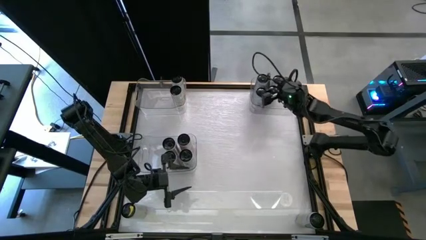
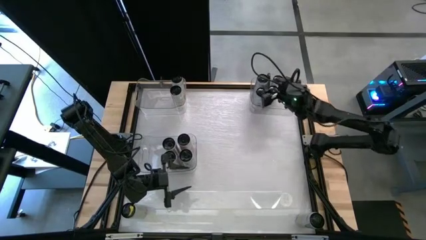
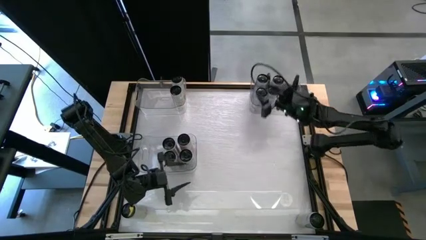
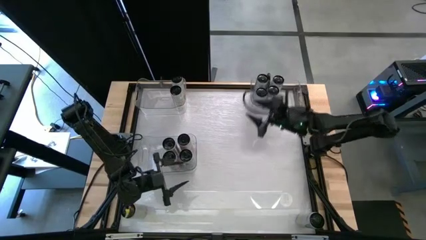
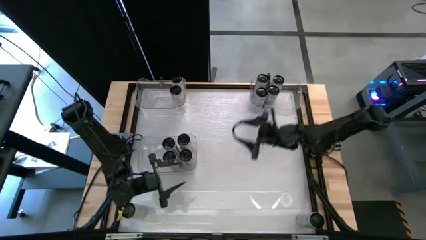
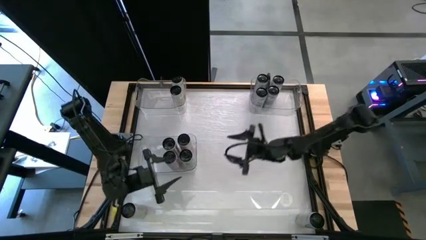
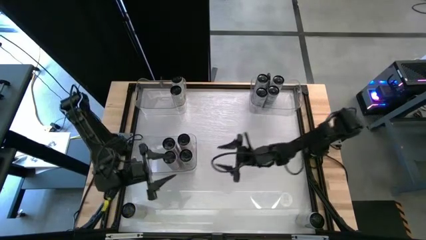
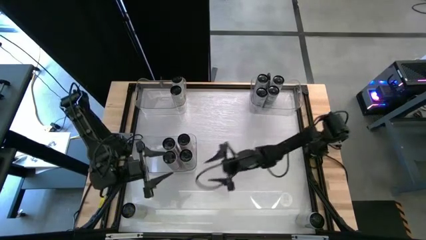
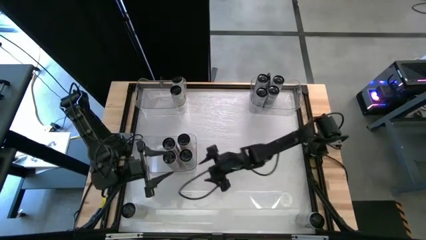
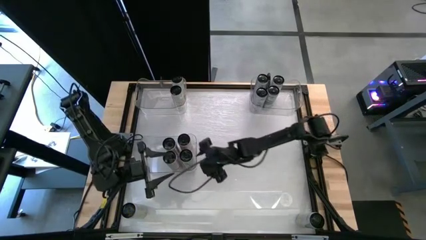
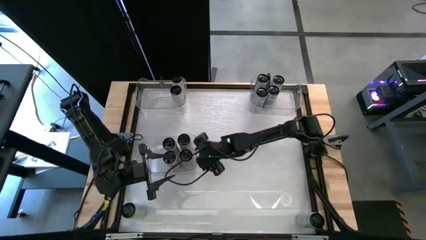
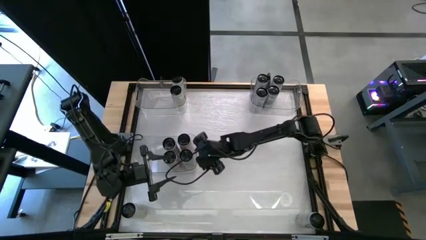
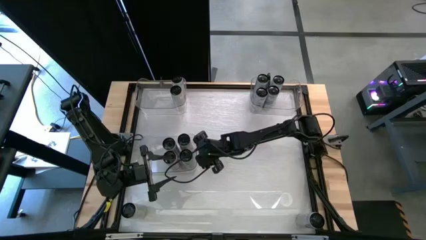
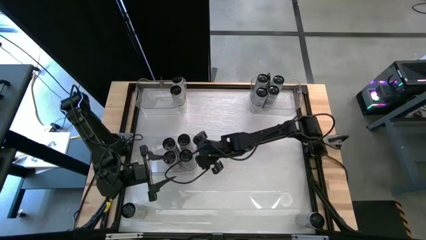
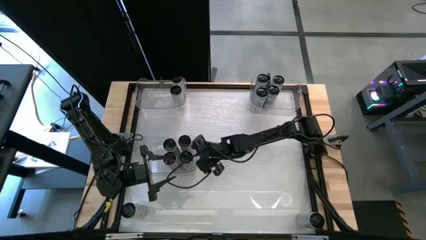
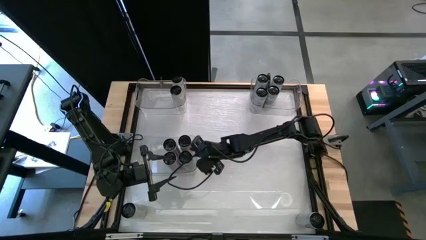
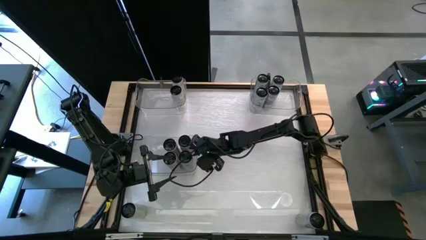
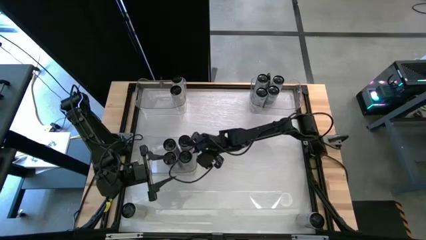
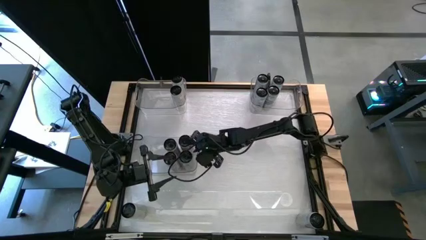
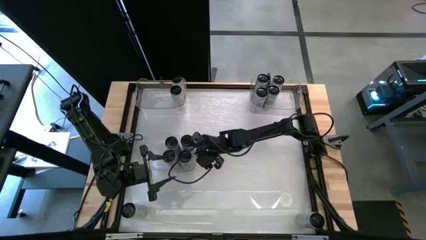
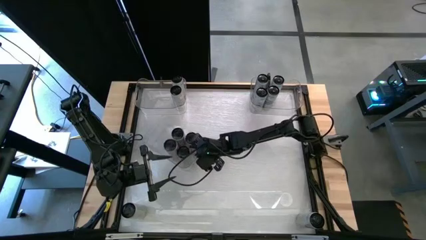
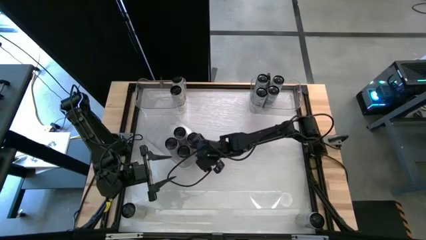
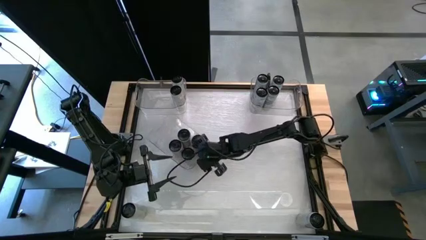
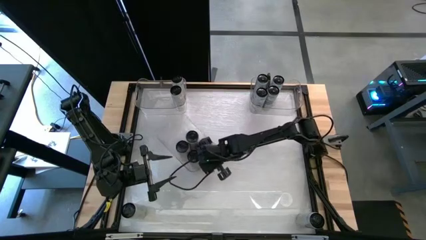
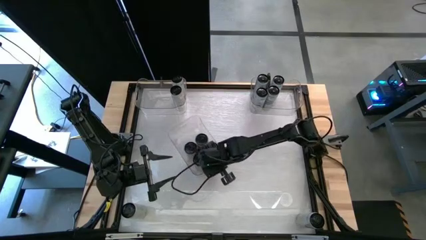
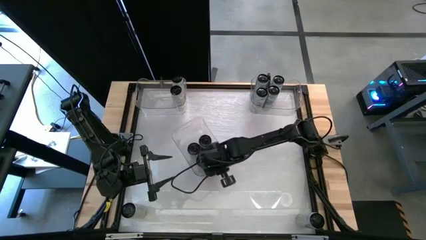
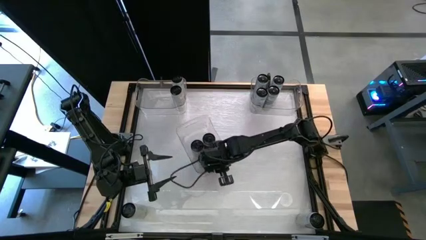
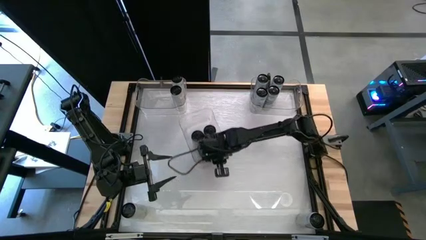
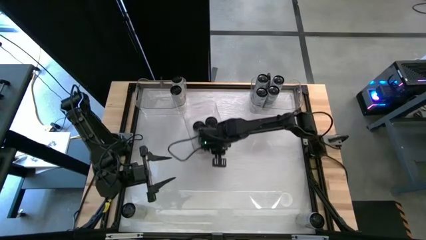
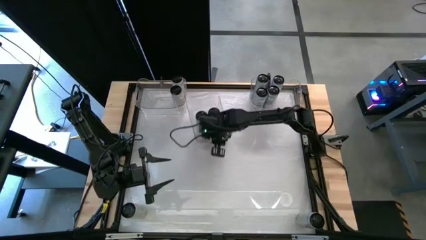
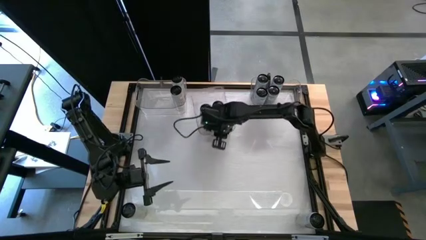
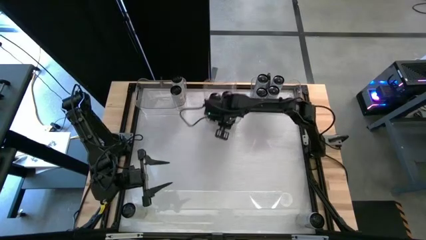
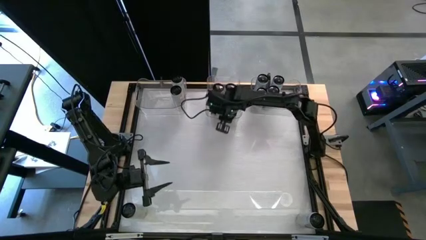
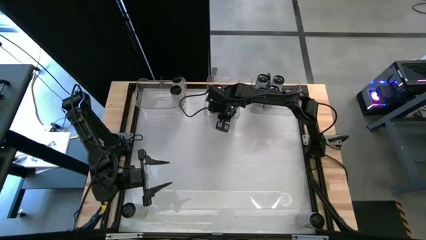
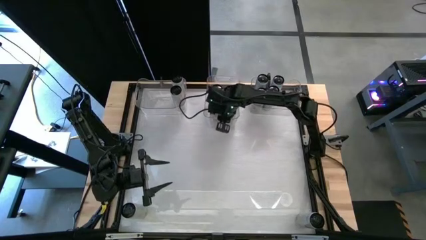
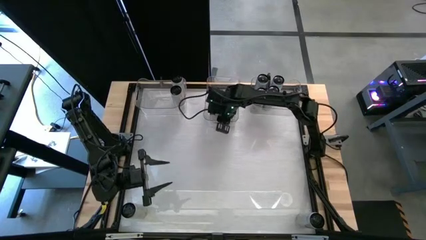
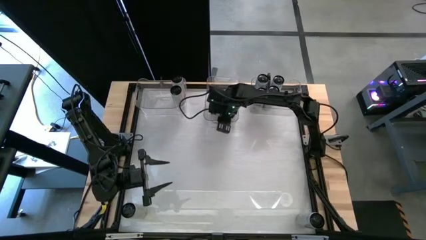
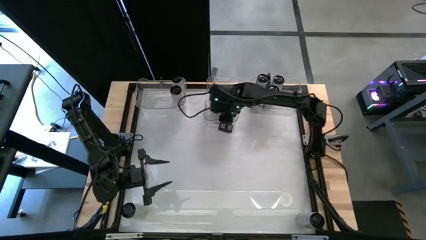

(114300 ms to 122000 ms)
Task: Sort soda cans
Move the bottom transparent bin to the top center of the table

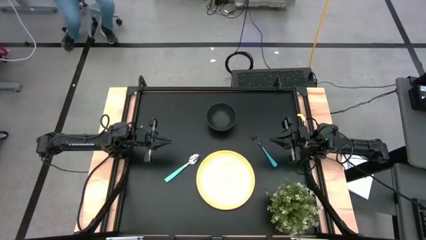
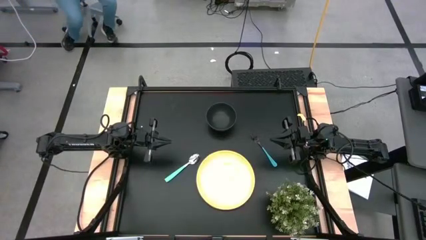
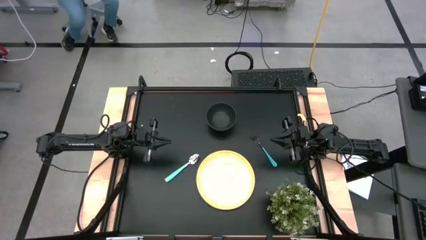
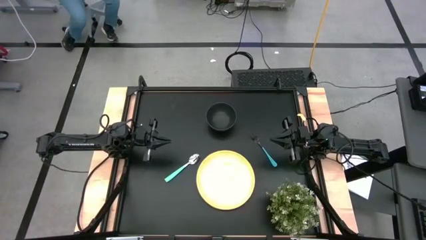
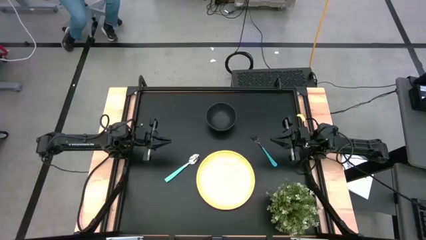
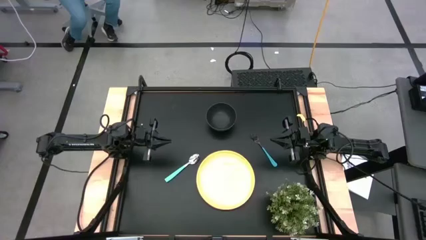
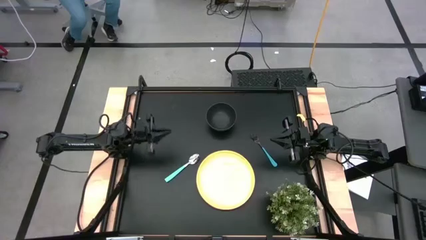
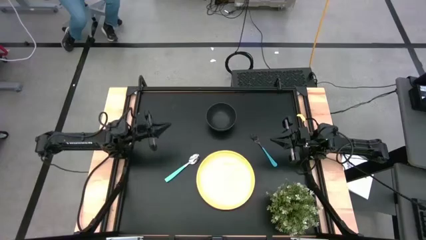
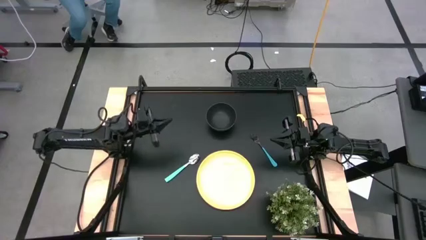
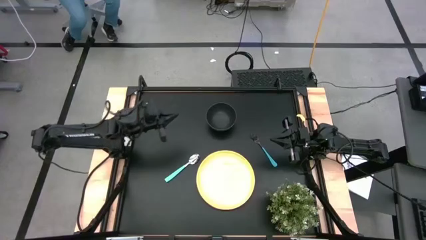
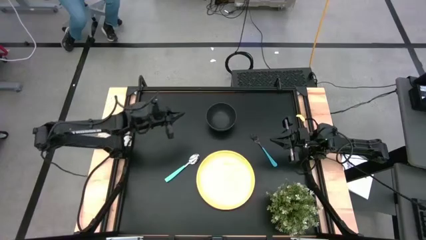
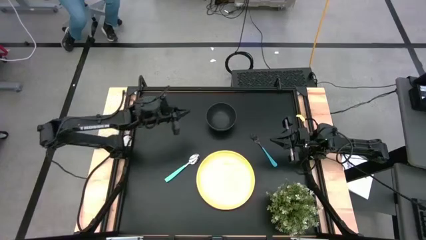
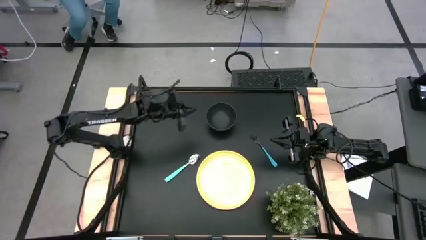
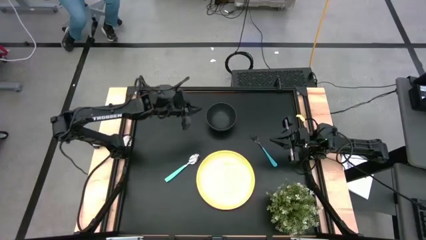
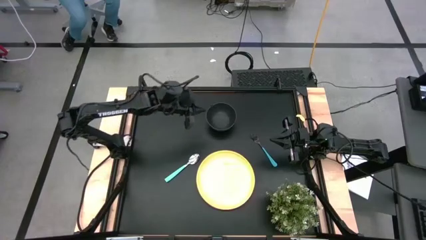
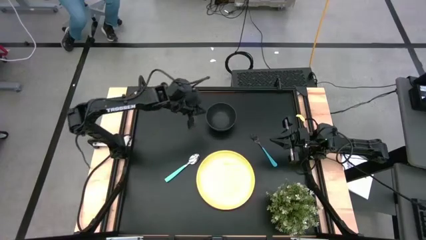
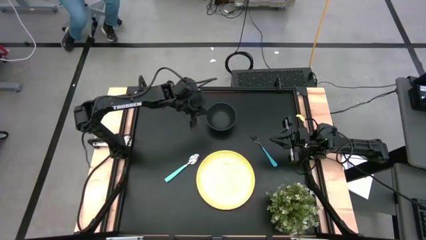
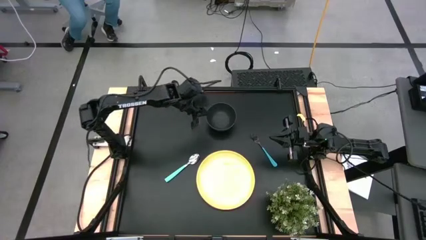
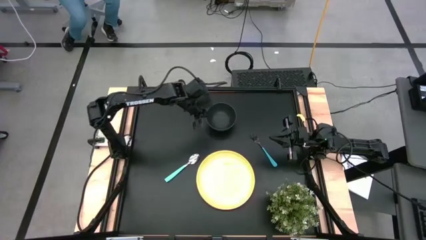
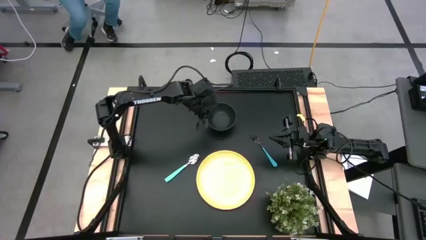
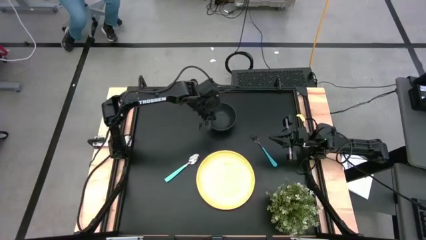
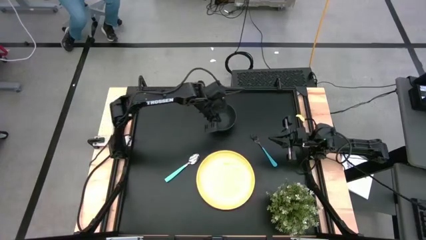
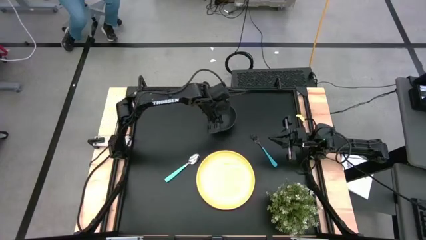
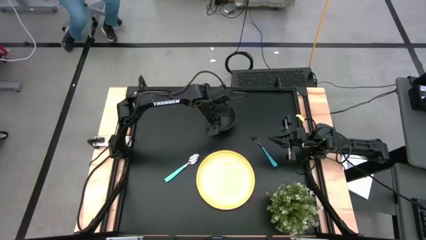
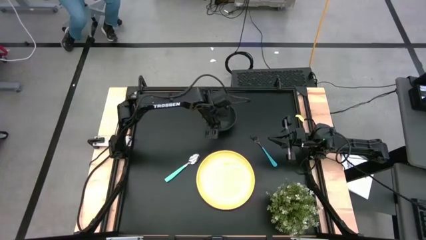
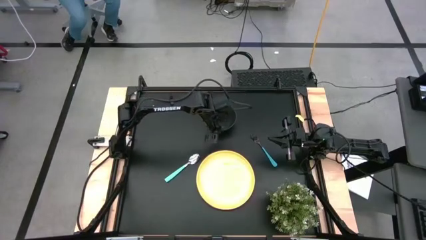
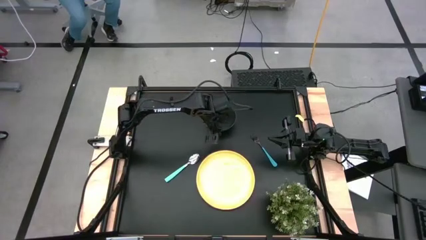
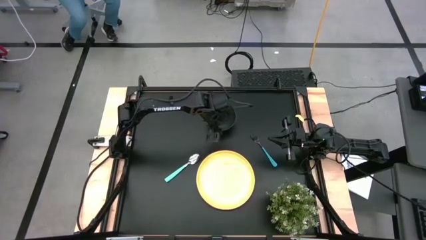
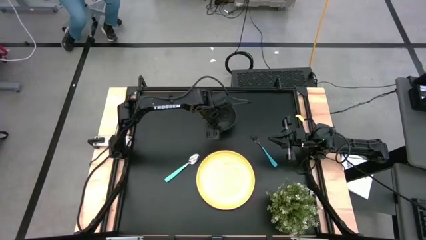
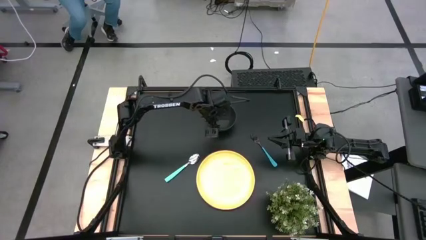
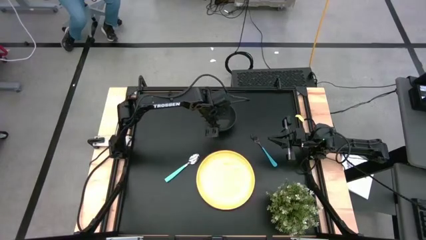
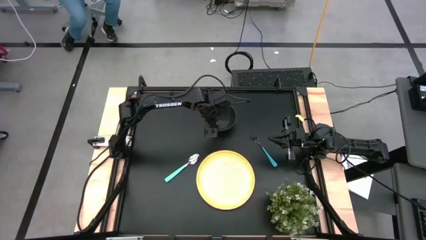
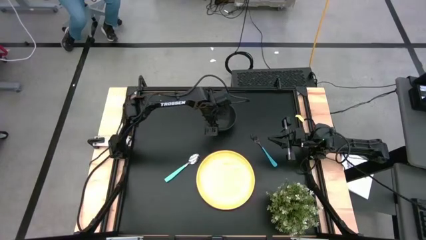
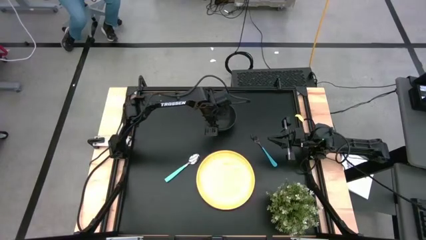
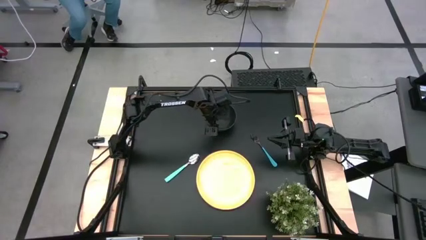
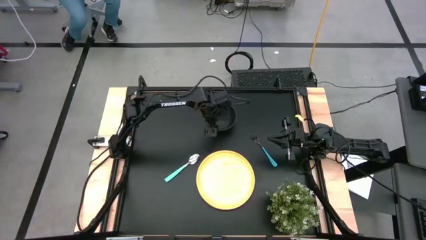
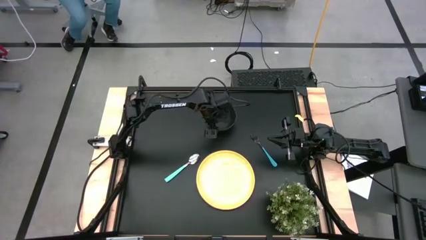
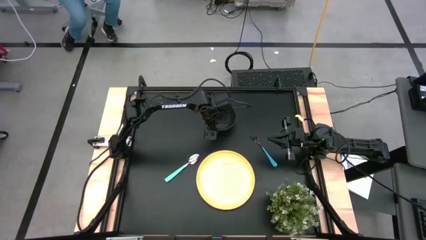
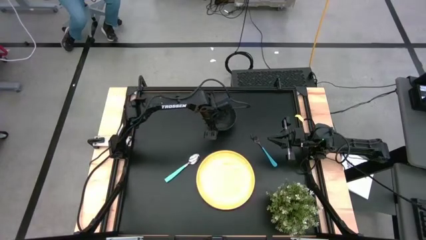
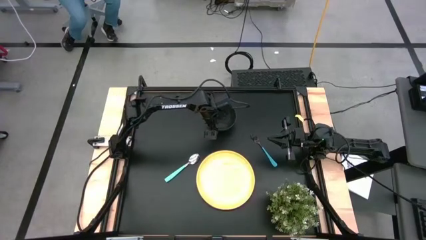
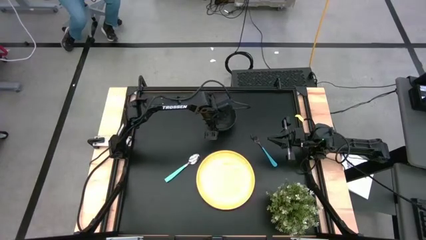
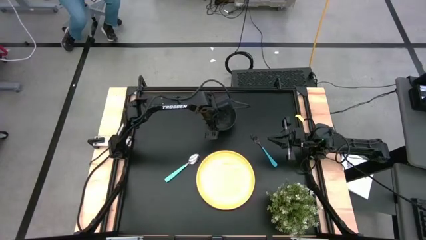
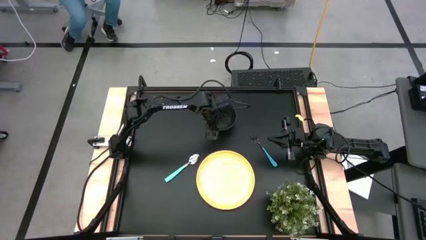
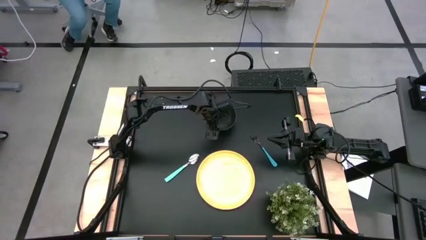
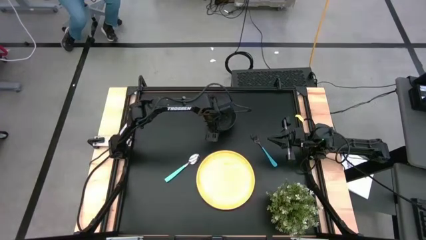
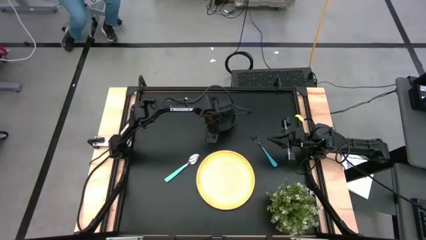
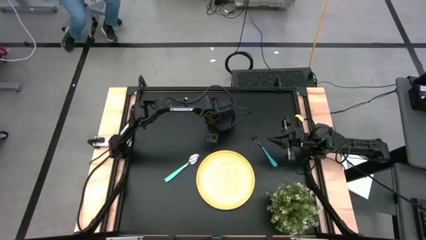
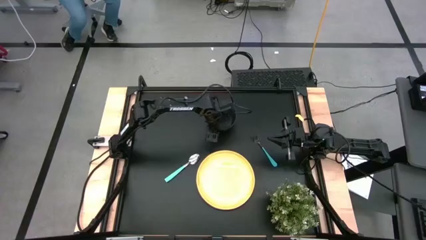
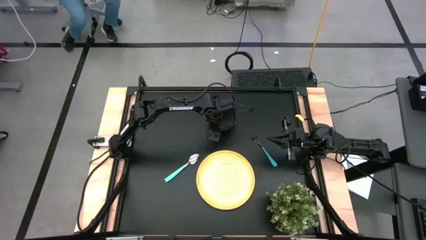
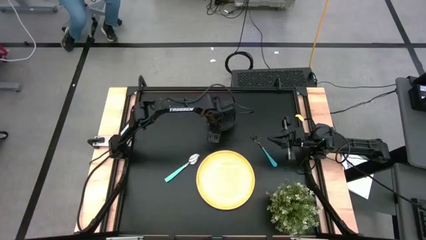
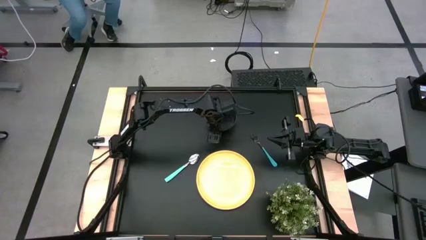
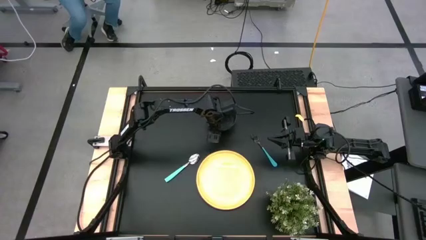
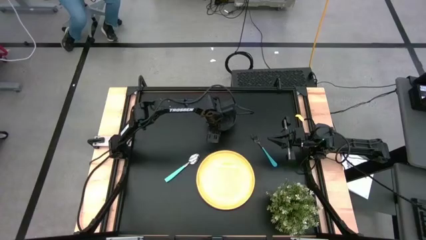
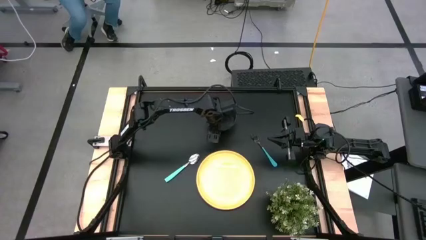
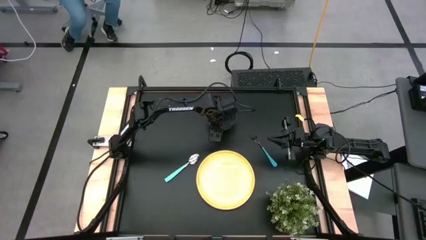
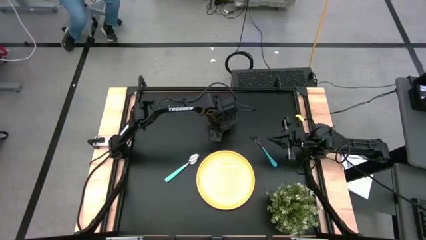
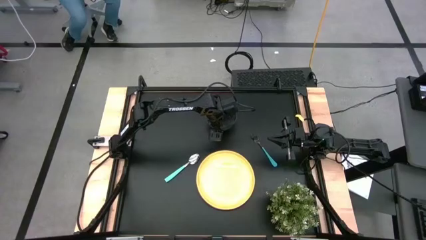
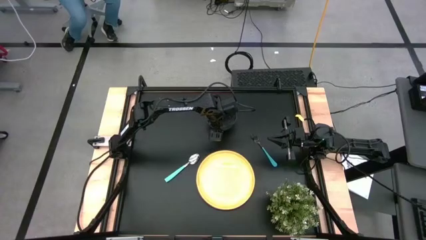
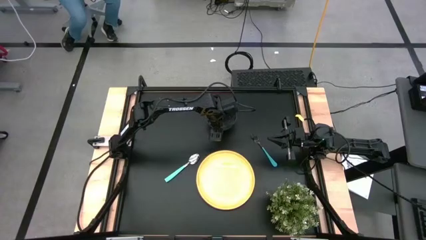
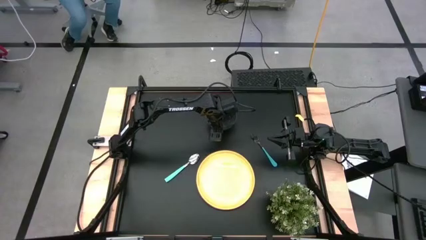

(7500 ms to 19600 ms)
Task: Pick and place plate/cup/fork/spoon on tray
Put the black bowl on the yellow plate
